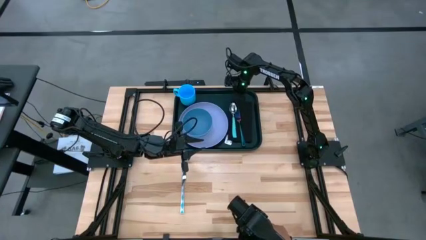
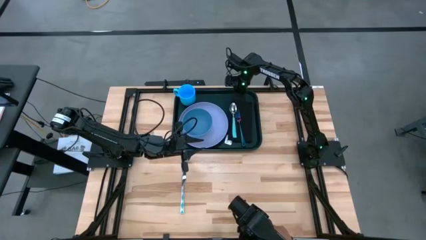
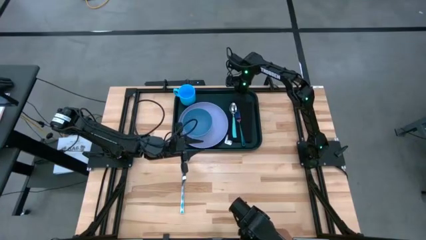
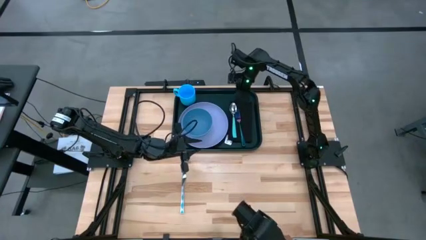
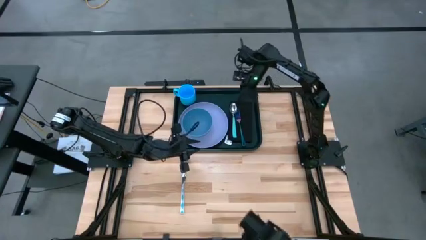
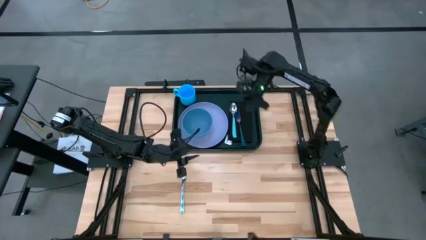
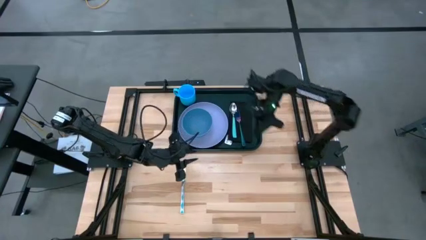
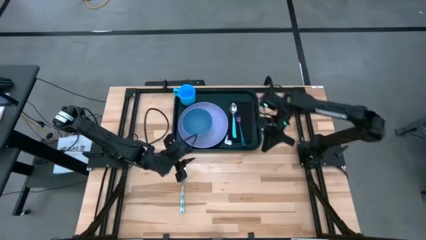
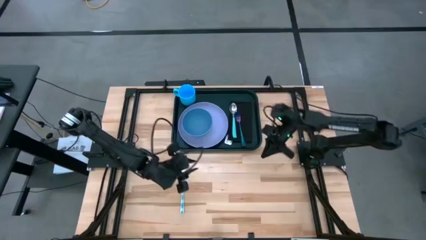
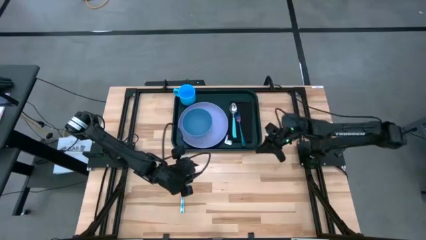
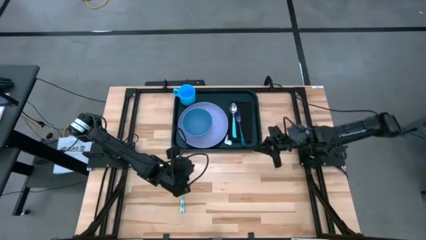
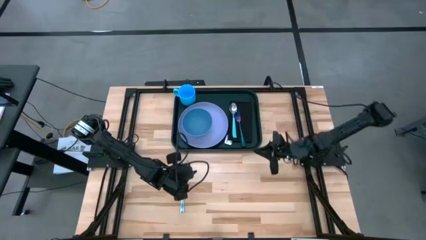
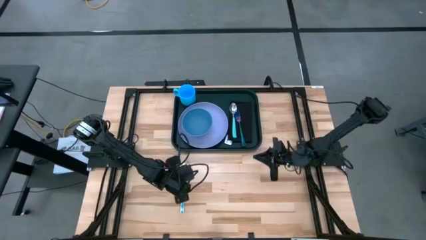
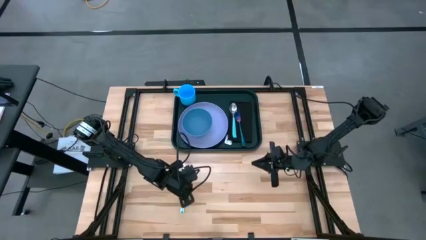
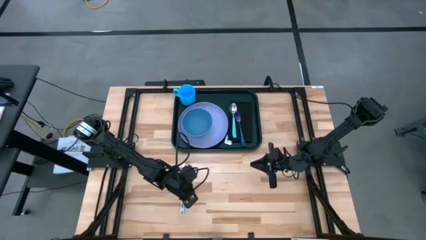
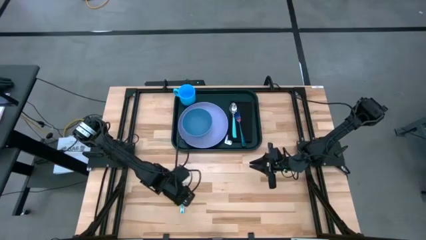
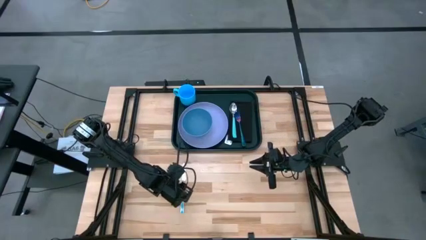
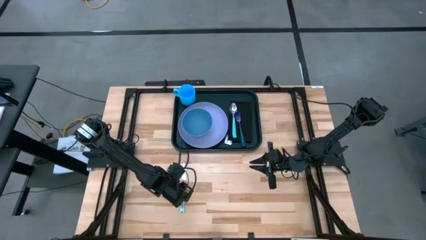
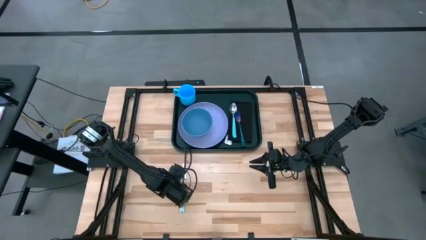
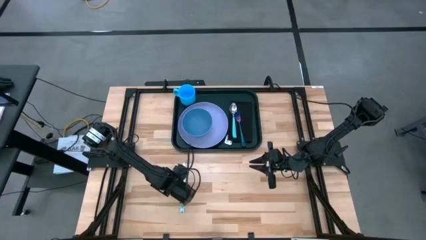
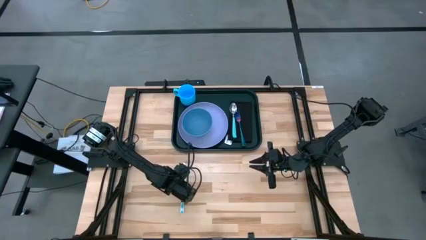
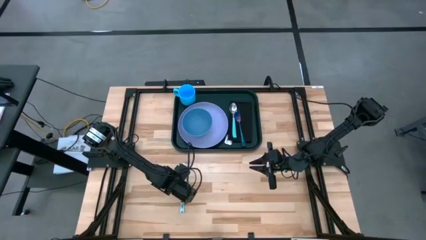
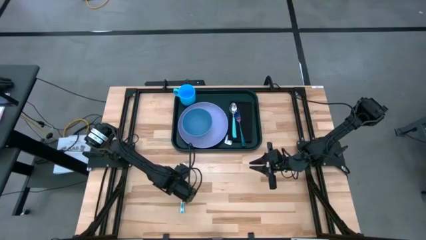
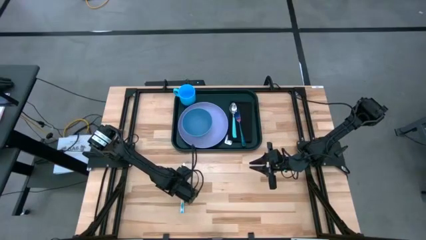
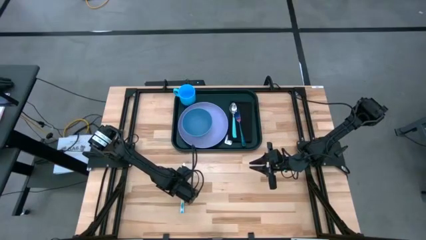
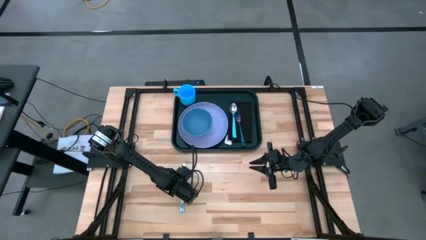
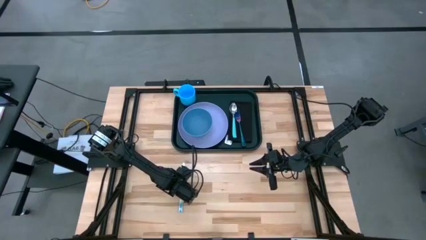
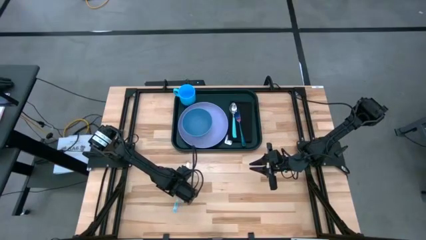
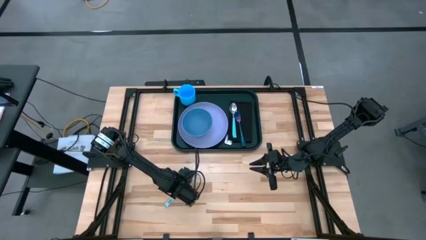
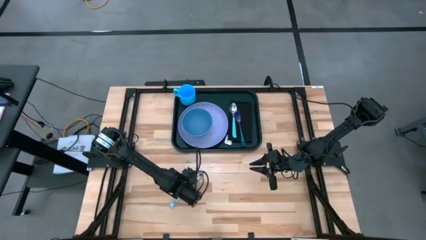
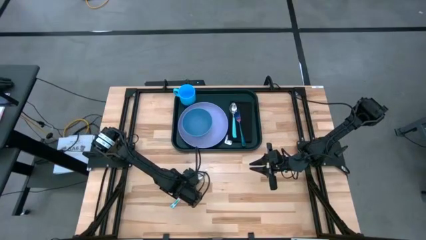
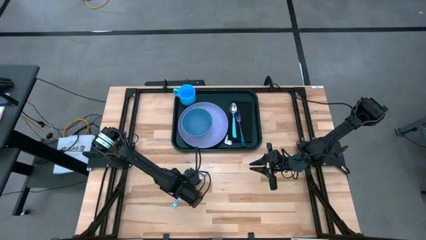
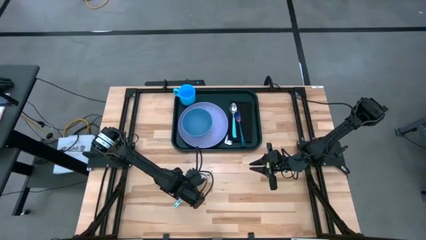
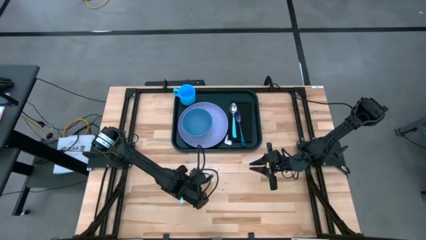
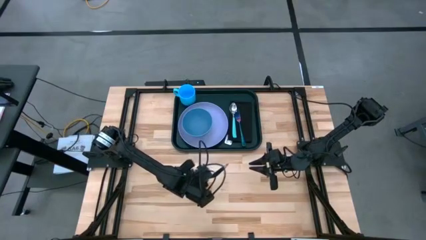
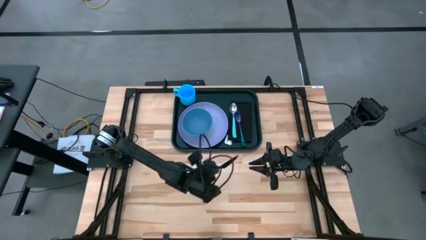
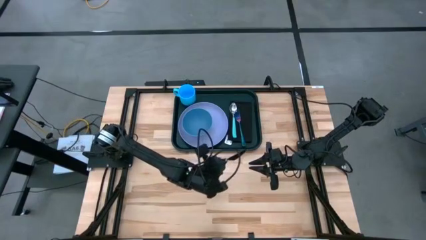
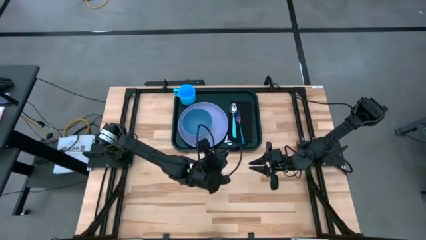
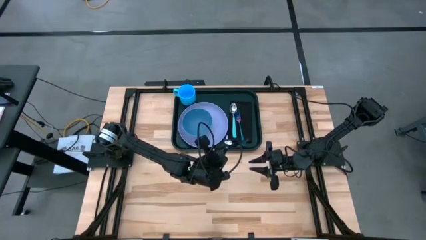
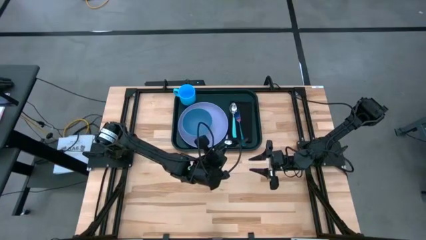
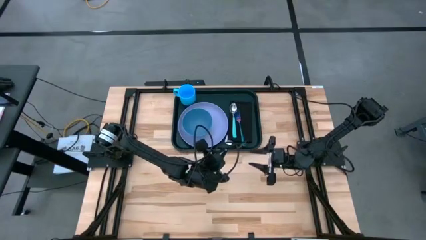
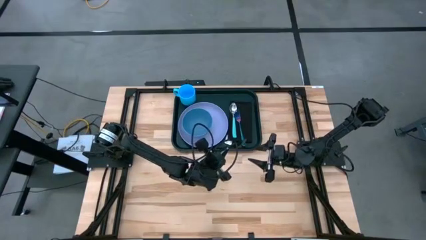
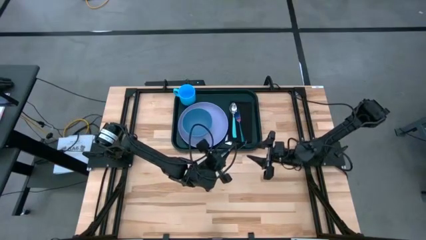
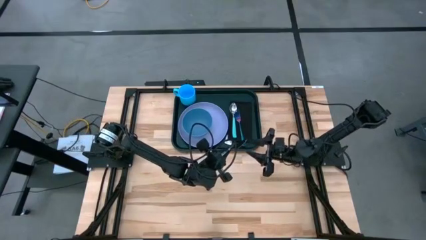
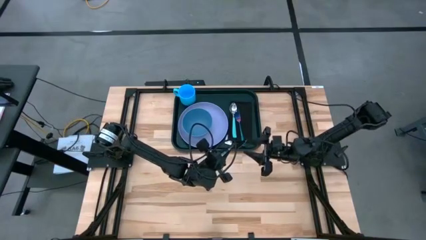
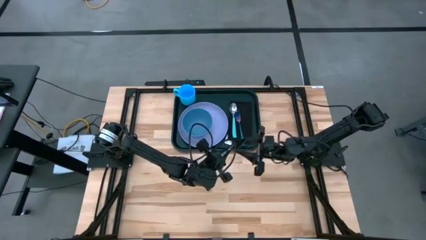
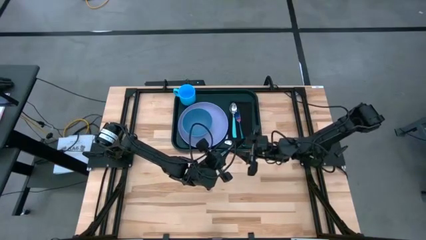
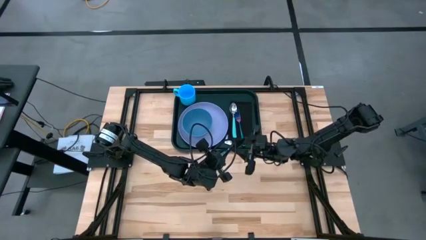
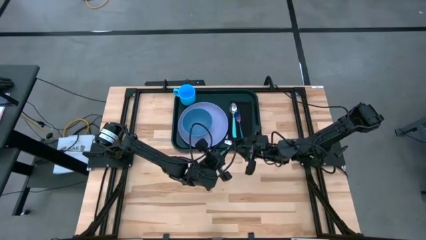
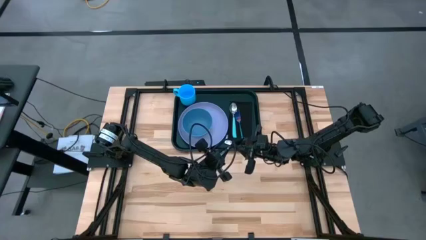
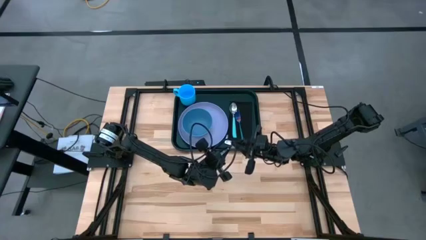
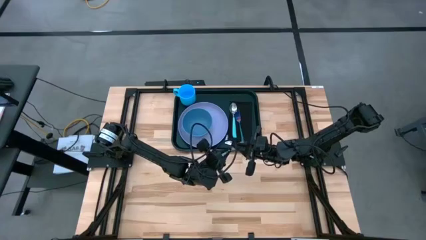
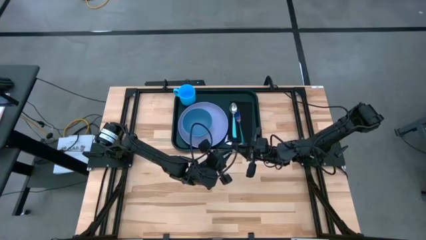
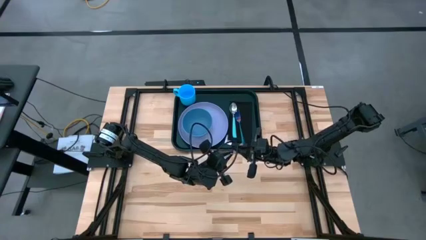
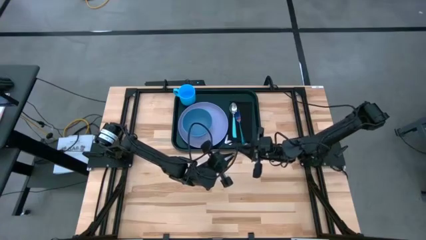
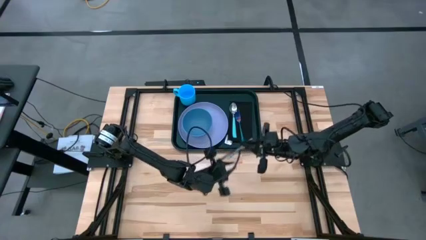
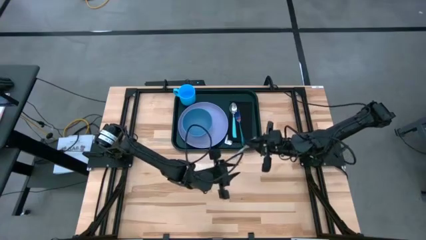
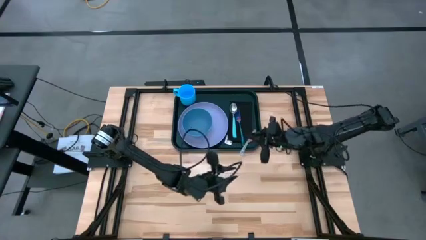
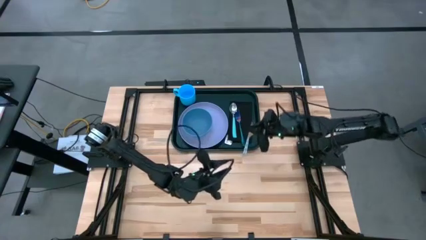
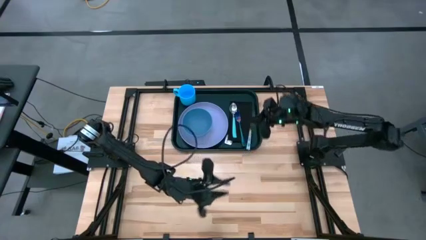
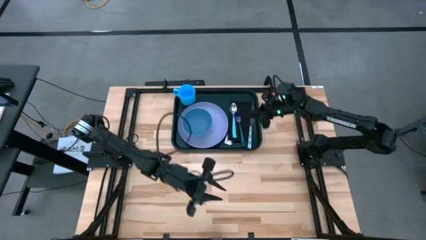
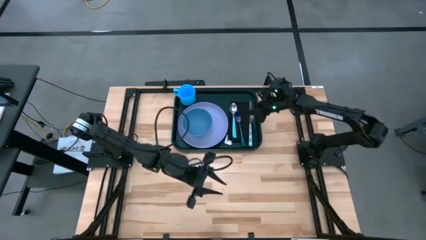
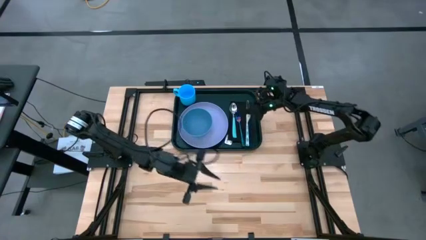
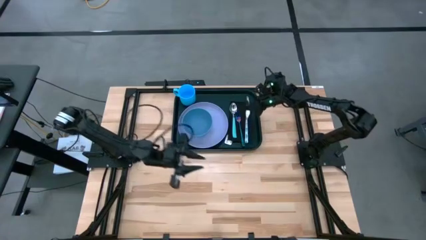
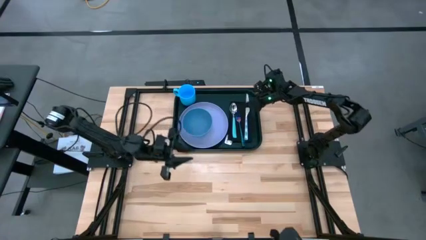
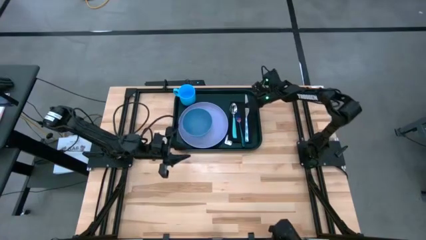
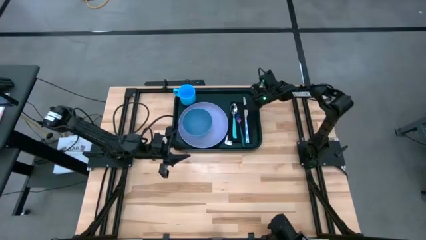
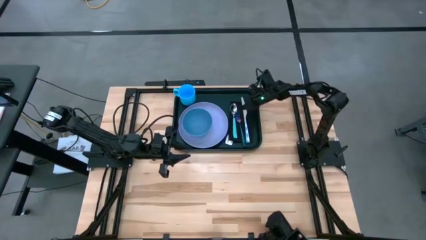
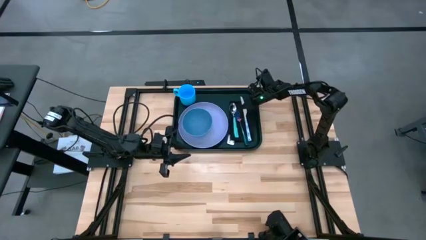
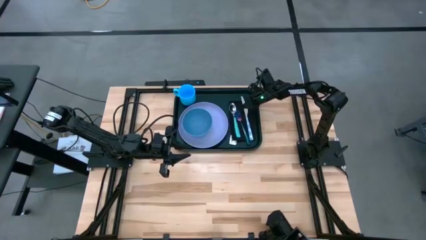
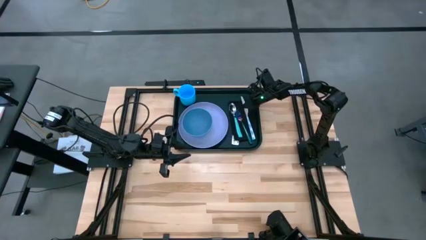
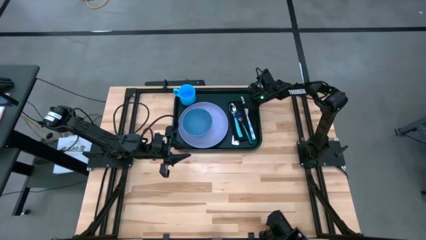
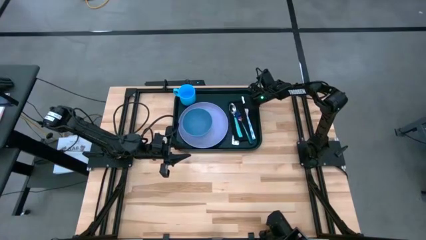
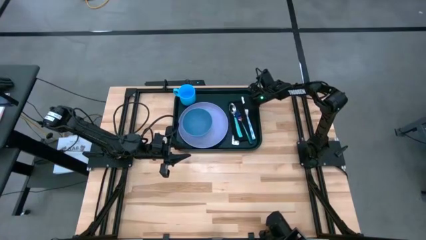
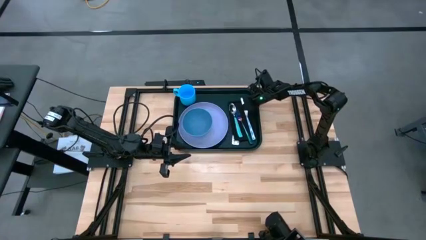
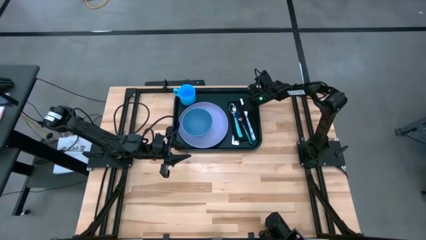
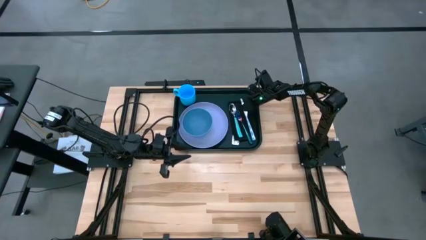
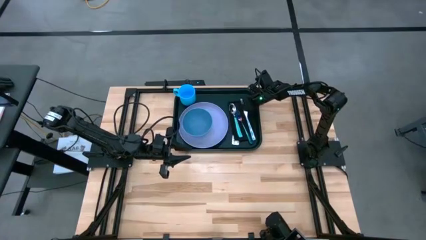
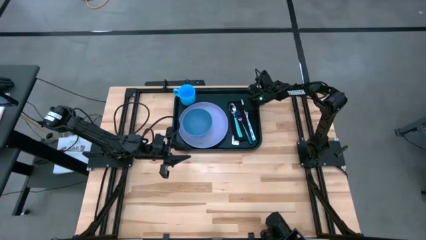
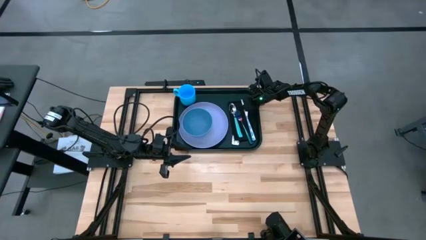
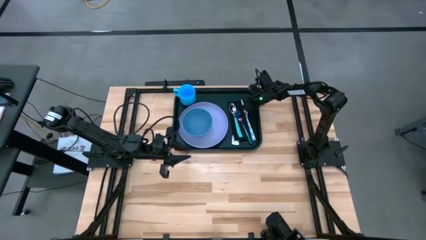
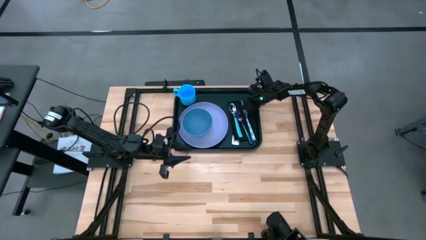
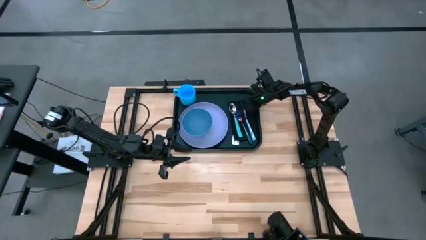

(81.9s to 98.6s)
Task: Set up tray
Put the blue knife on top of the black napkin to the right of the blue fork
